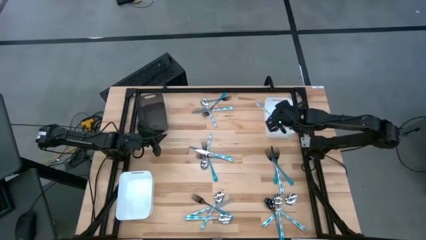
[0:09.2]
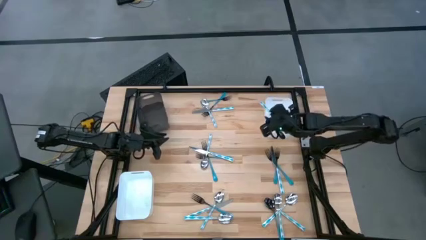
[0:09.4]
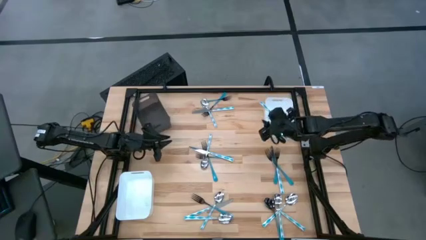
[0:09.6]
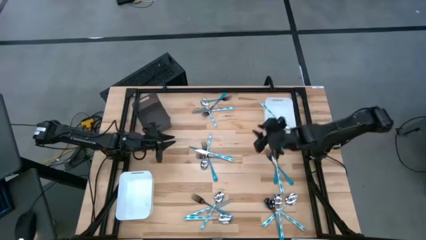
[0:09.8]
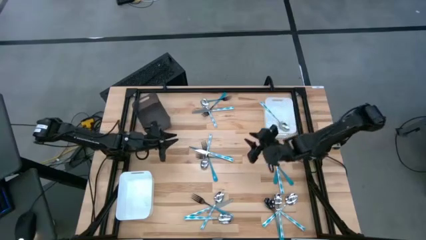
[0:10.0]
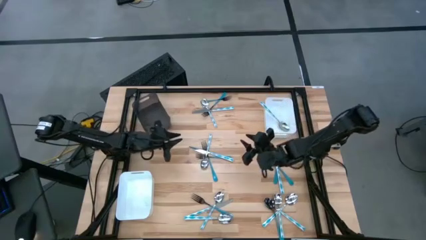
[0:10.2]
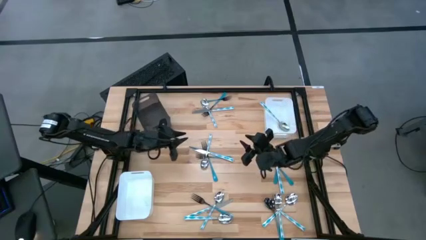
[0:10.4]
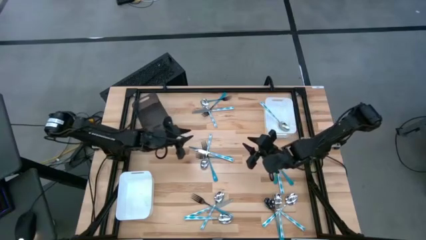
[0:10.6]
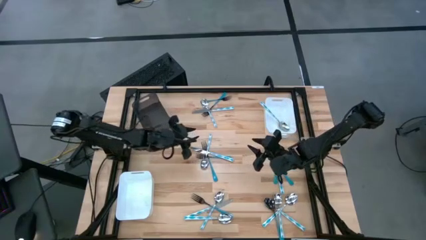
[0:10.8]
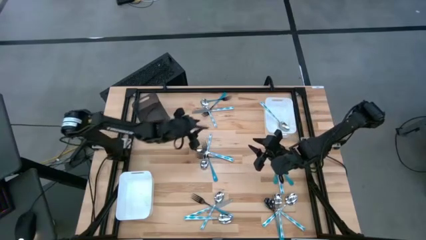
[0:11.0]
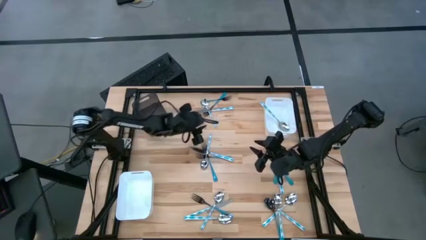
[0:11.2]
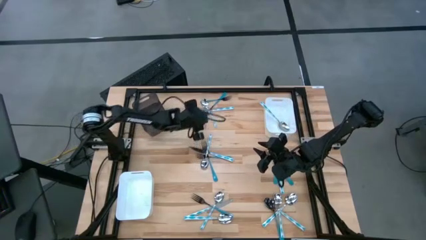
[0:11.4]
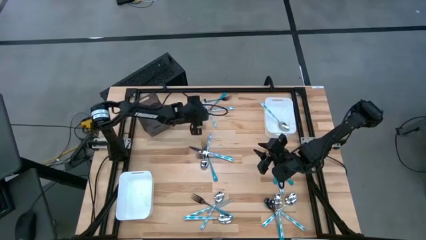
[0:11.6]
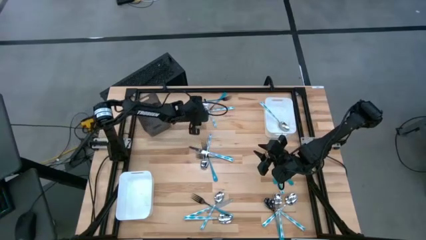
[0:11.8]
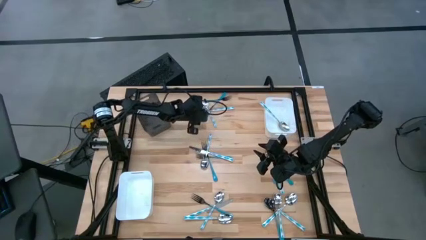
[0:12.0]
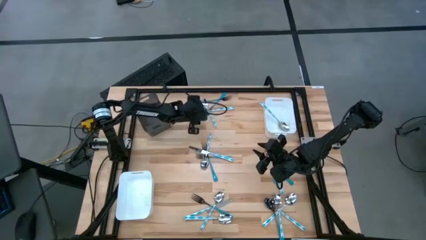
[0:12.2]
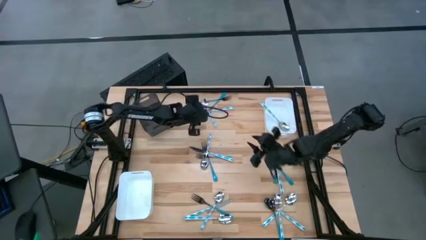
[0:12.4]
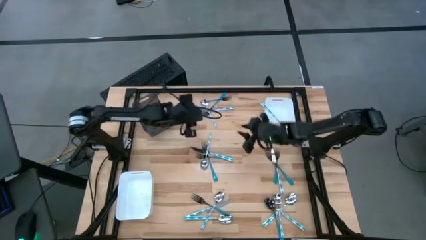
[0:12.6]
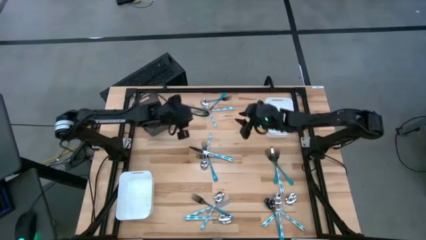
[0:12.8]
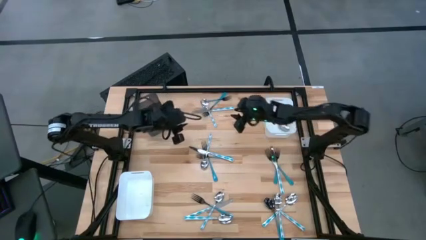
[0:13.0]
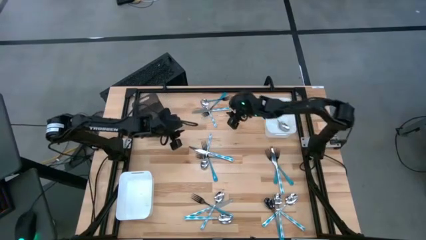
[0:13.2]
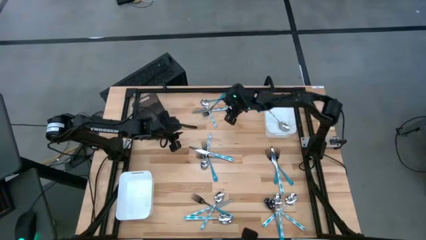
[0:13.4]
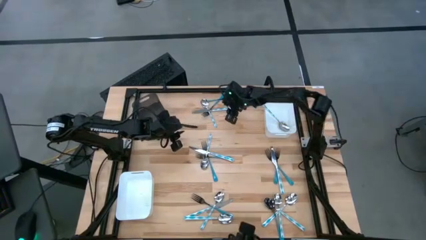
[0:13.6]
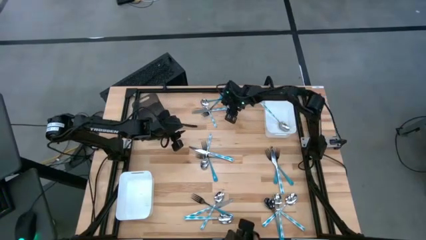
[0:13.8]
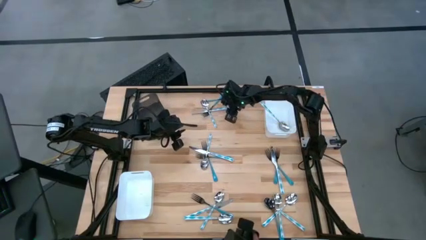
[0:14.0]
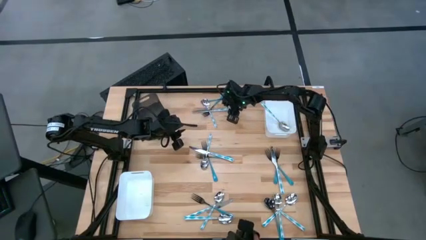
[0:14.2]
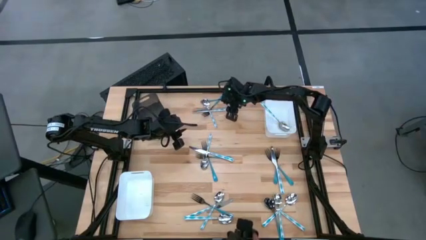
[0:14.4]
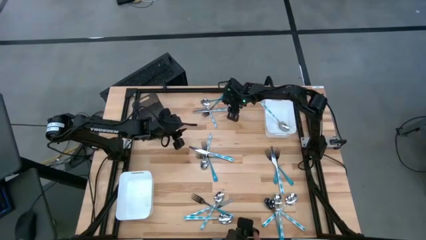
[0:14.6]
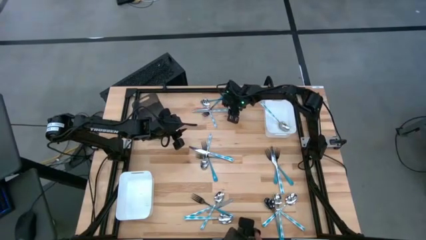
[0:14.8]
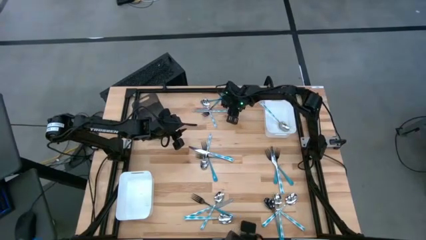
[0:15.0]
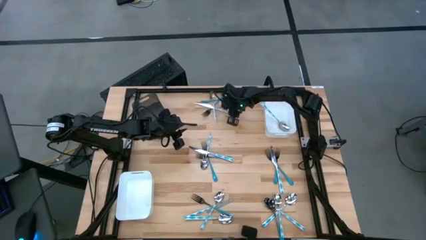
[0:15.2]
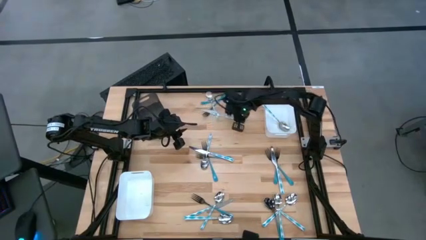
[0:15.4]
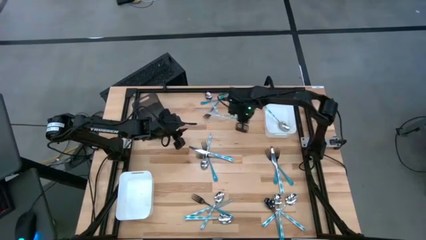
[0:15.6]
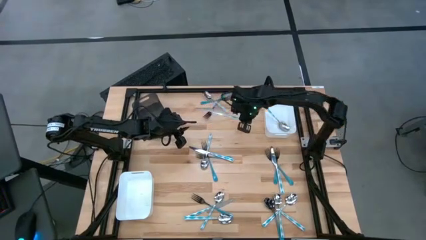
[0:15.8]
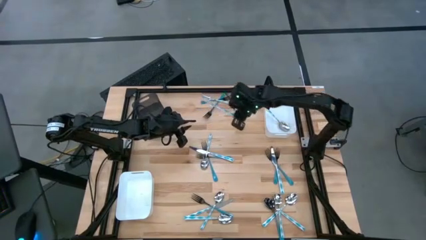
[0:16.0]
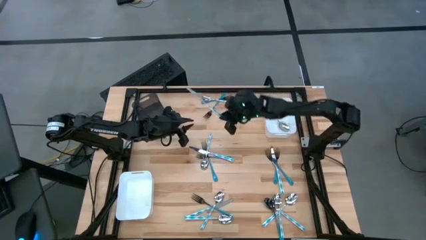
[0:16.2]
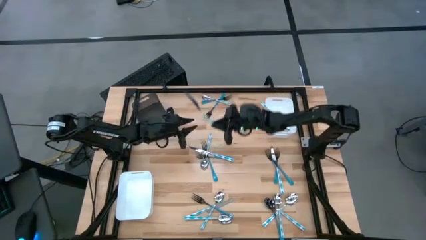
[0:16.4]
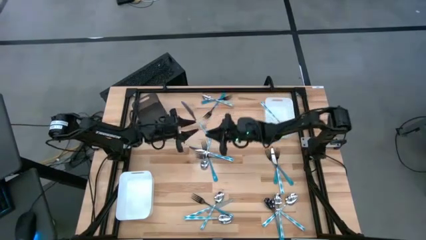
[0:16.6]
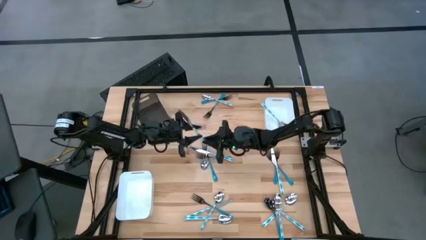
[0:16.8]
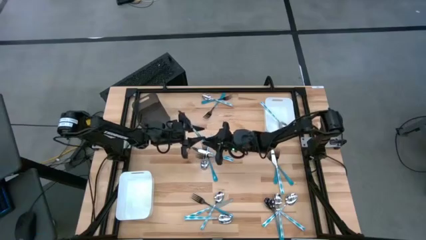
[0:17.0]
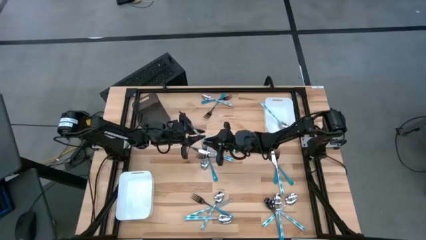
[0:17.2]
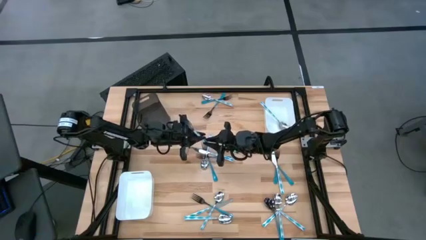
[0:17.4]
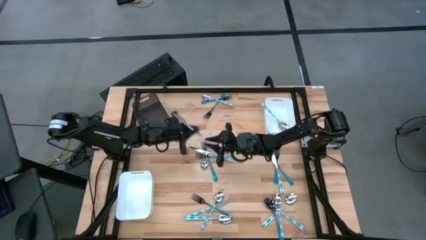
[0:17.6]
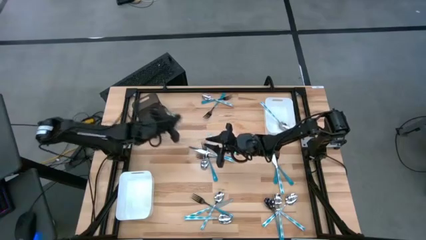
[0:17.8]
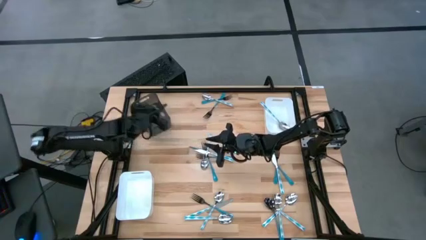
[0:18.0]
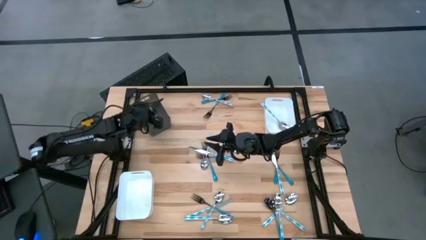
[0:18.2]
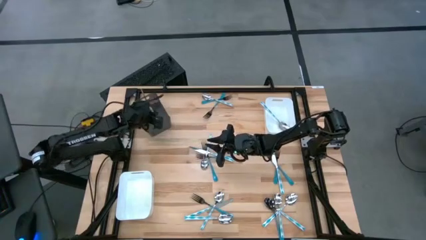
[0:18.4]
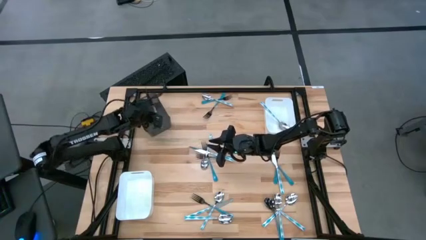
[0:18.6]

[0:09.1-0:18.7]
Task: Sort silverware by color (type)
Put the blue white knife into the black bin

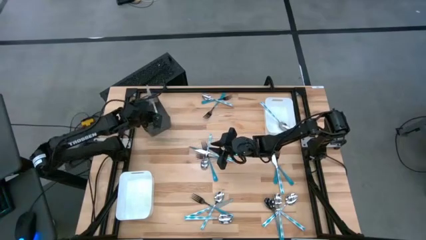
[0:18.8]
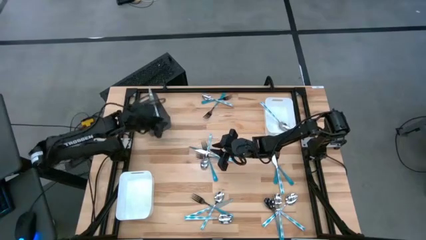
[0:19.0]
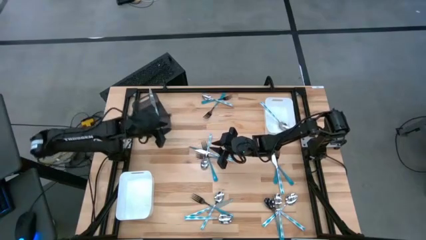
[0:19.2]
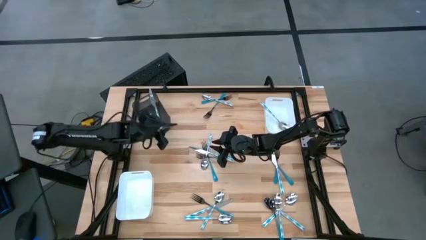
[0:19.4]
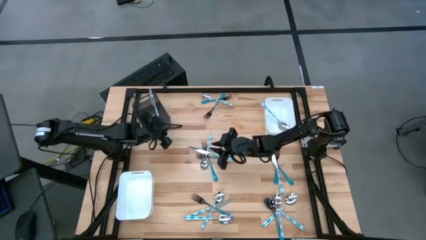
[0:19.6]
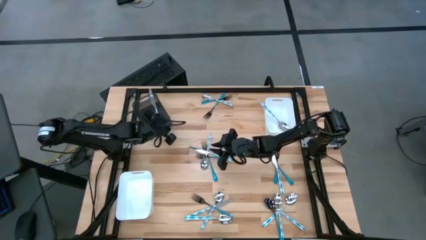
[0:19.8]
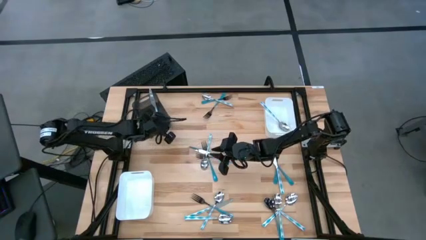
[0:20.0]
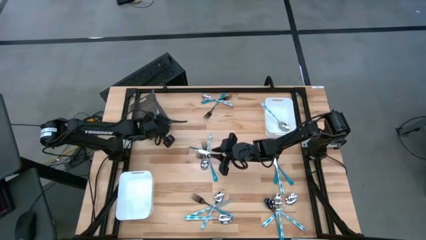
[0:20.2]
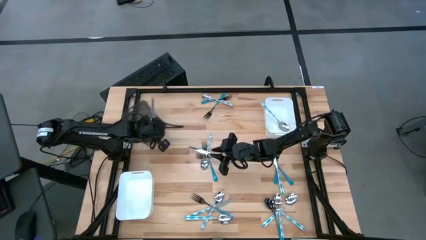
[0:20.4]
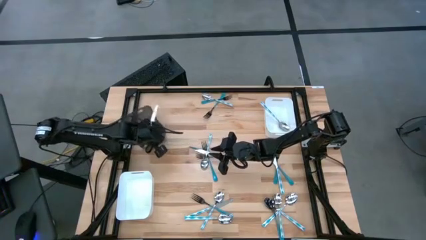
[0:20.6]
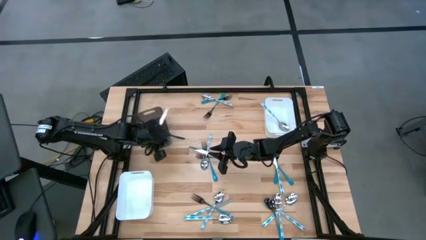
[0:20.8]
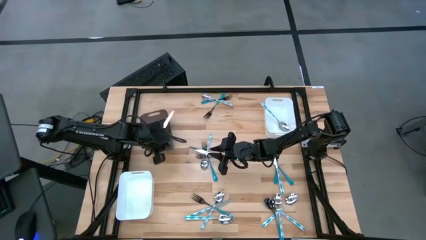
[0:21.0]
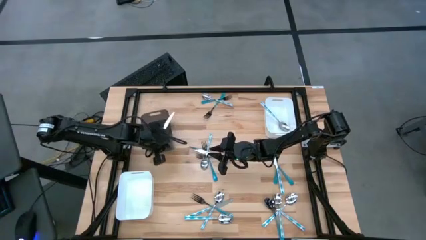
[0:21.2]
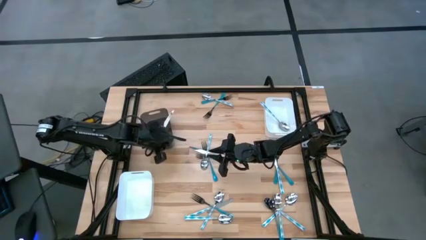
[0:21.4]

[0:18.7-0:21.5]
Adjust the black bin

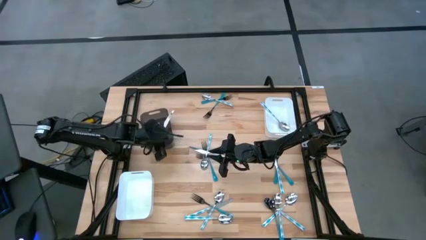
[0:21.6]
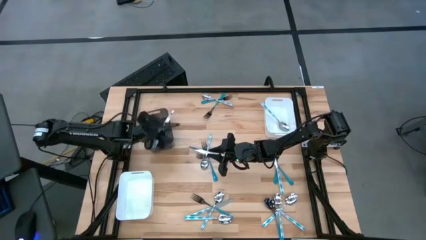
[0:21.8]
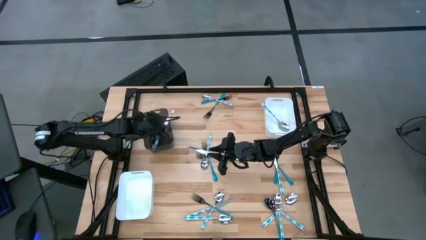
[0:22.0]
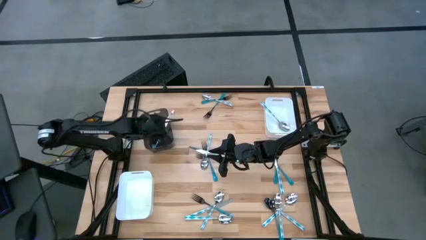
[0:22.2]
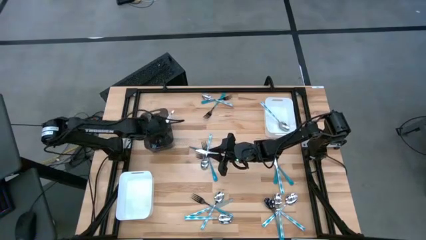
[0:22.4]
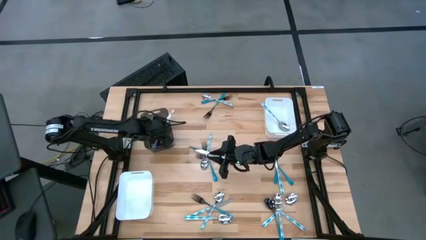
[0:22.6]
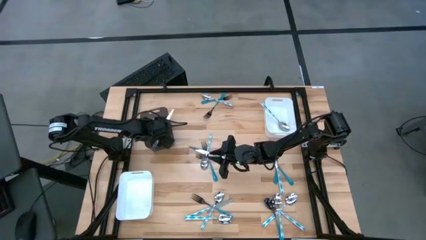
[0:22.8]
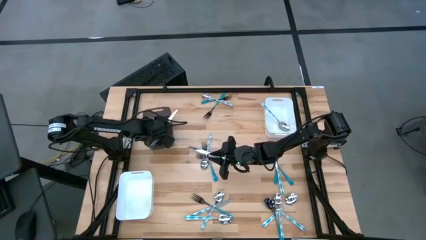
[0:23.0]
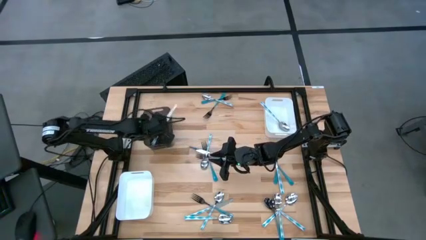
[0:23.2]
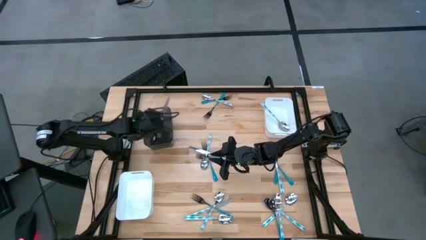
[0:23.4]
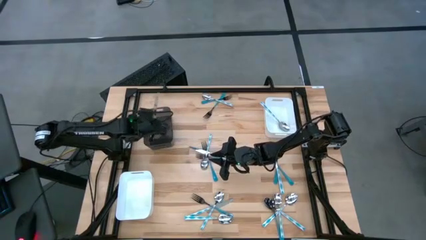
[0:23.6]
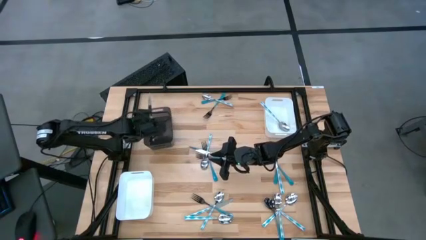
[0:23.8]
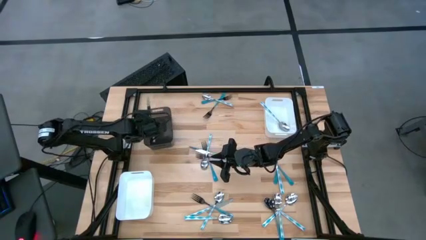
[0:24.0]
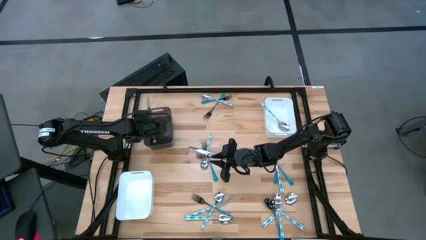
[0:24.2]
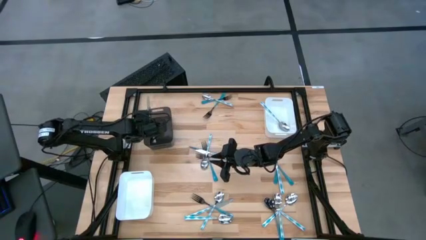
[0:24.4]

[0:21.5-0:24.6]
Adjust the blue white knife

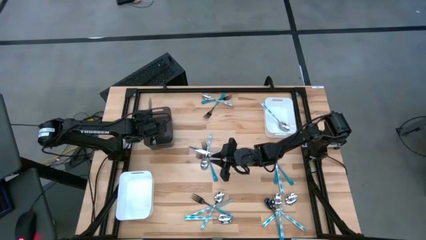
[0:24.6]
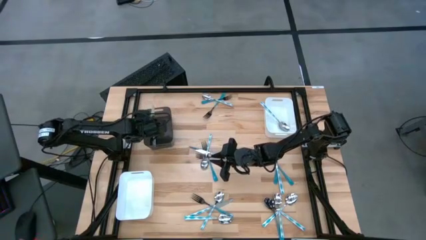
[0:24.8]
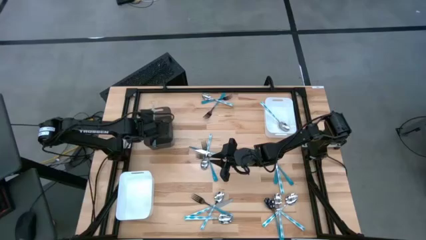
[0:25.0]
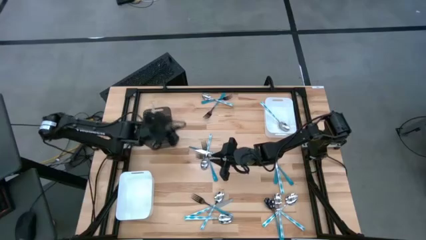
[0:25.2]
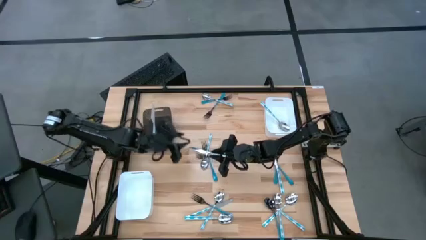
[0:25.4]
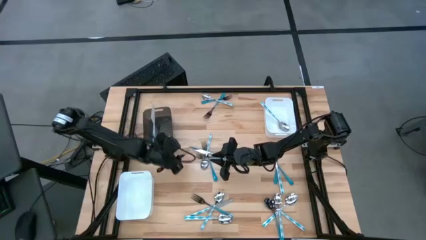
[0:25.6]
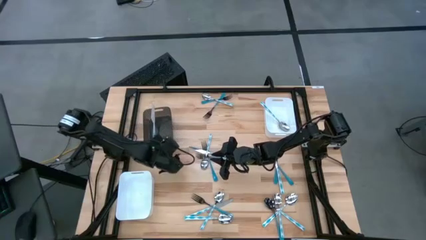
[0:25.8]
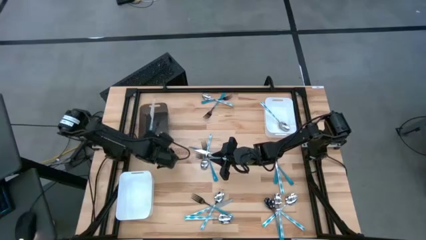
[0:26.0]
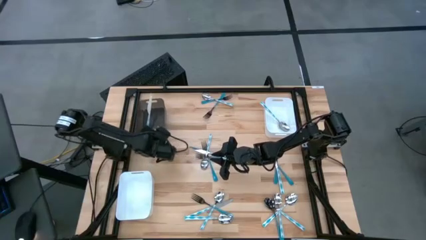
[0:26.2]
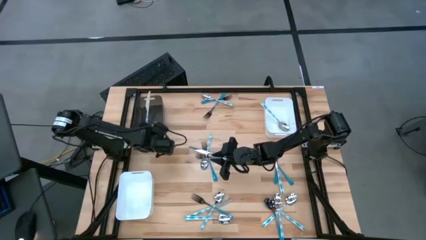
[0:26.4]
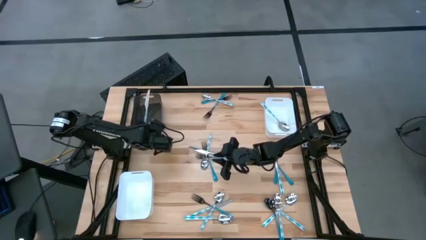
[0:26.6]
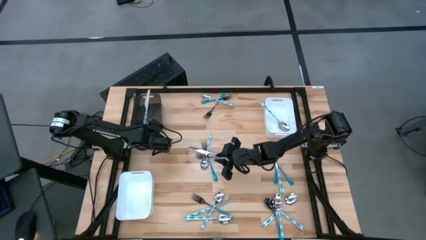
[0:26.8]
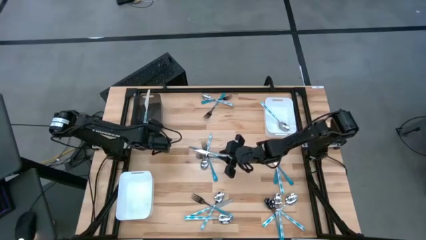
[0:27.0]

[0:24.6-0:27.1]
Adjust the black bin
